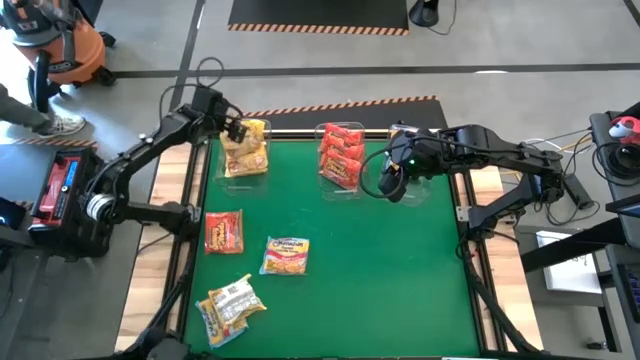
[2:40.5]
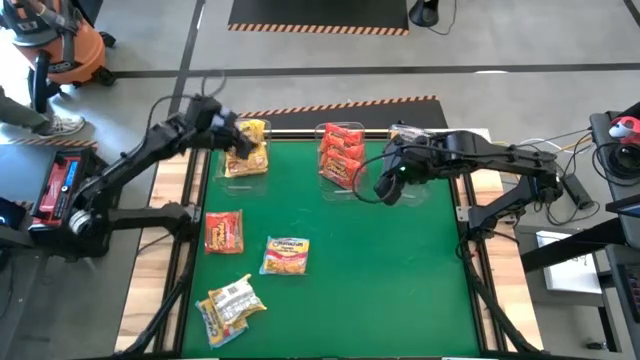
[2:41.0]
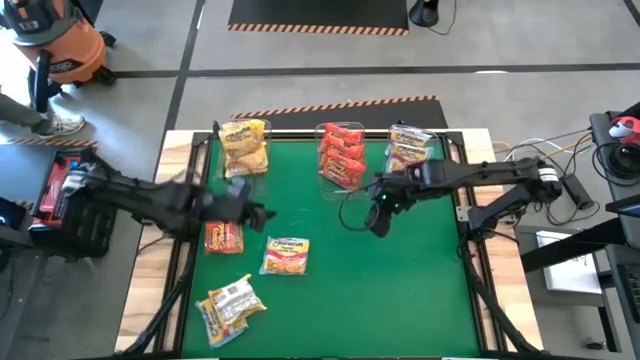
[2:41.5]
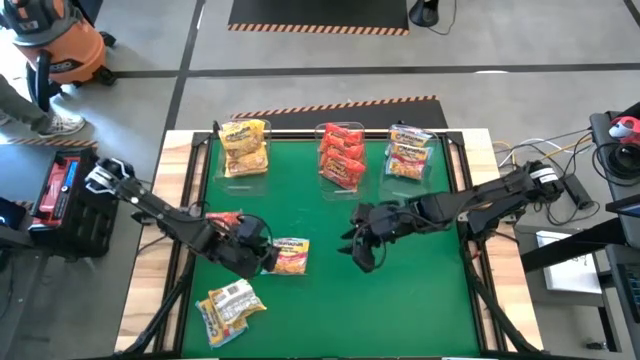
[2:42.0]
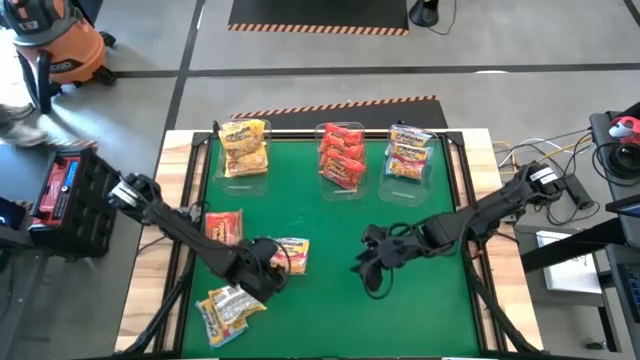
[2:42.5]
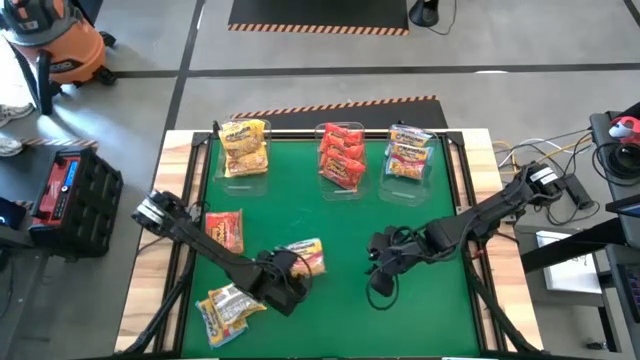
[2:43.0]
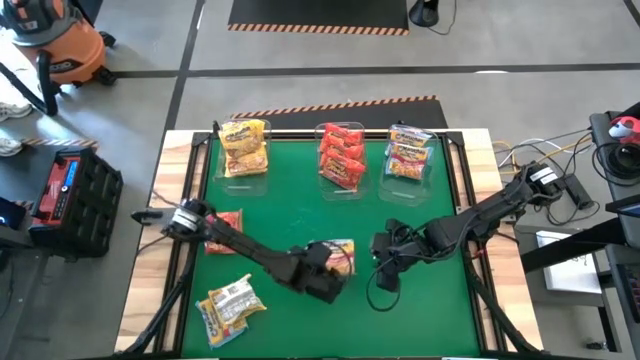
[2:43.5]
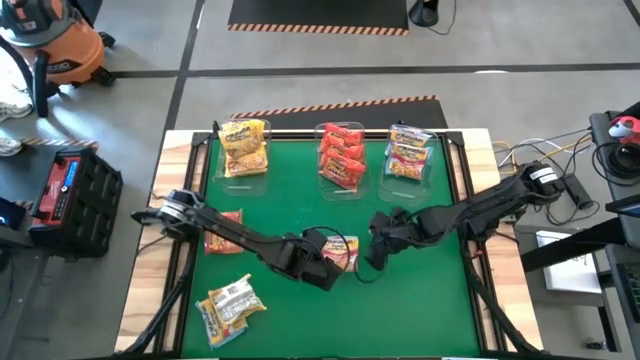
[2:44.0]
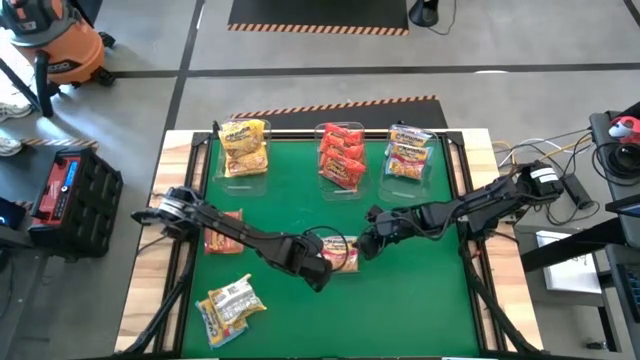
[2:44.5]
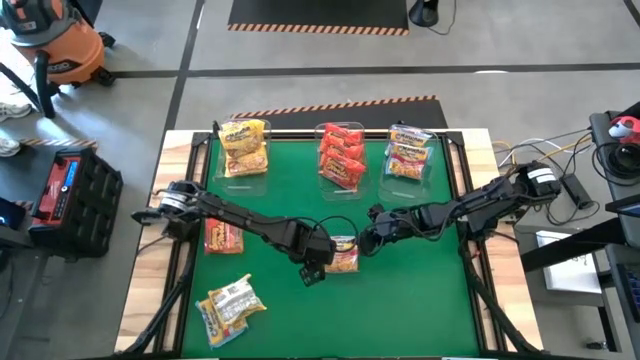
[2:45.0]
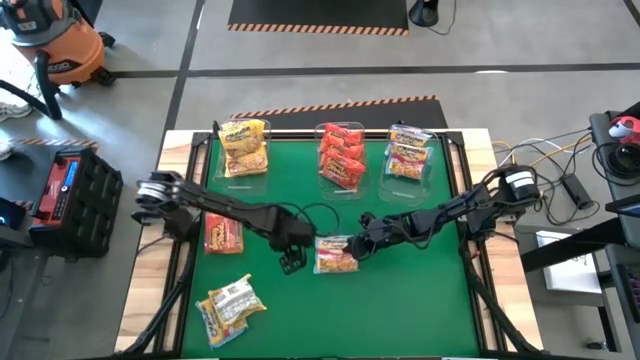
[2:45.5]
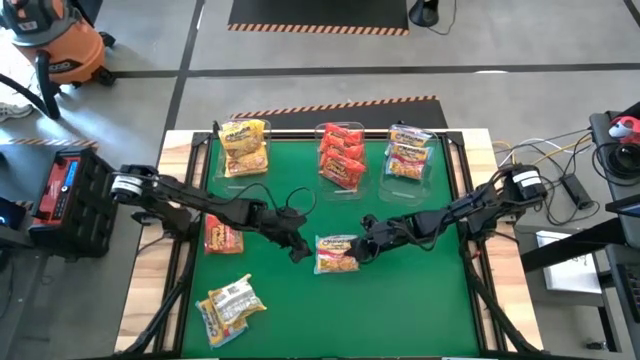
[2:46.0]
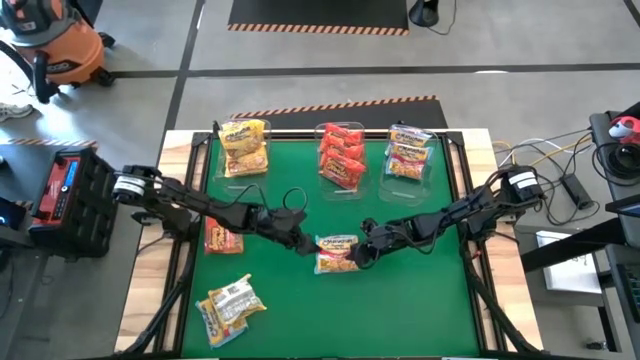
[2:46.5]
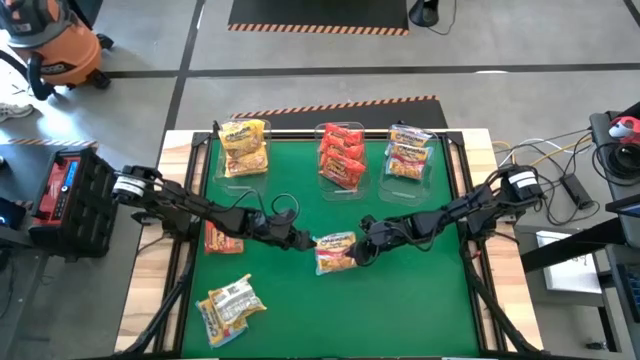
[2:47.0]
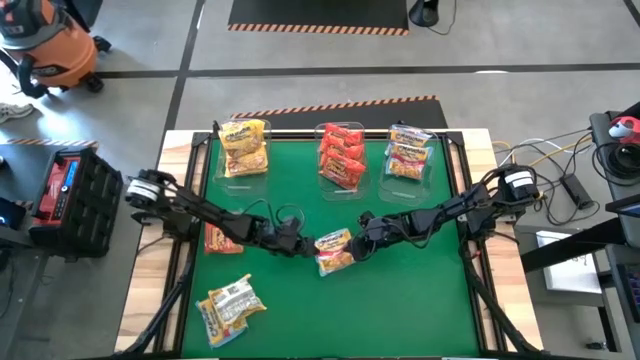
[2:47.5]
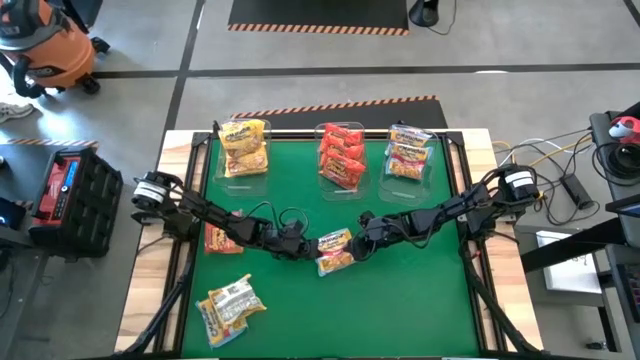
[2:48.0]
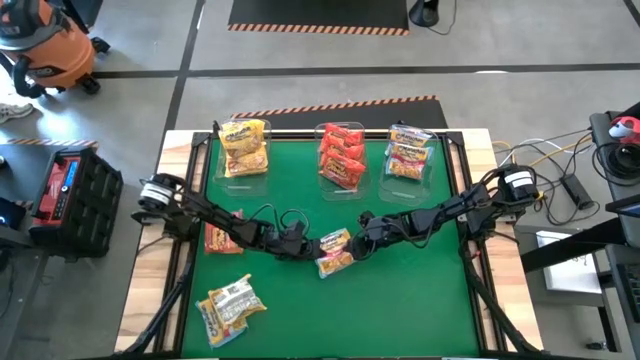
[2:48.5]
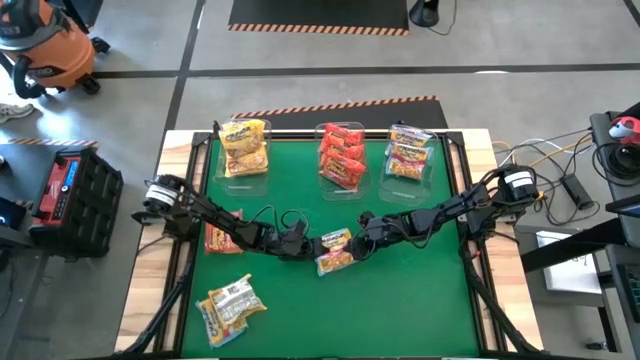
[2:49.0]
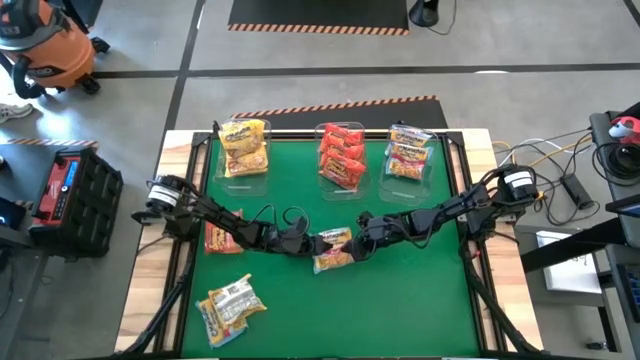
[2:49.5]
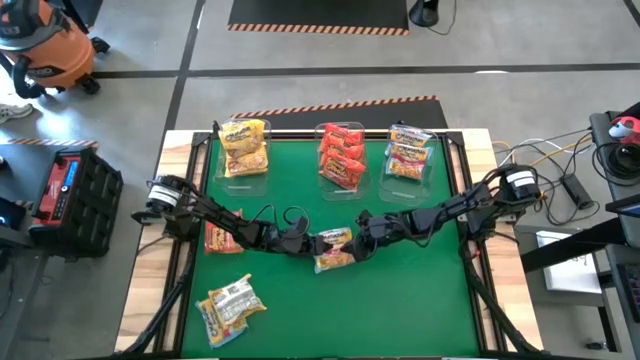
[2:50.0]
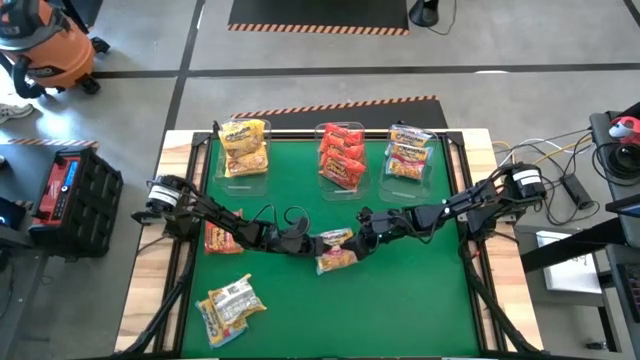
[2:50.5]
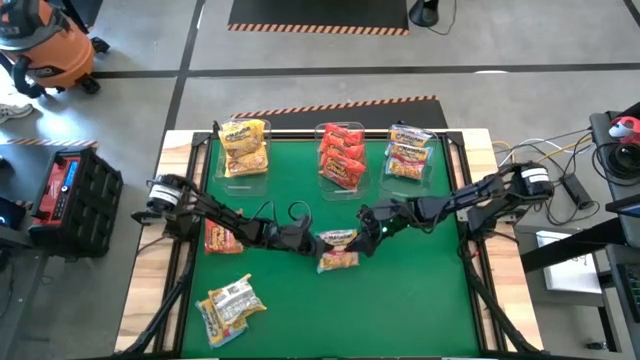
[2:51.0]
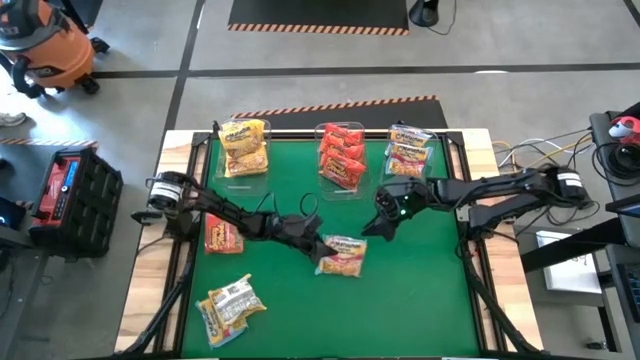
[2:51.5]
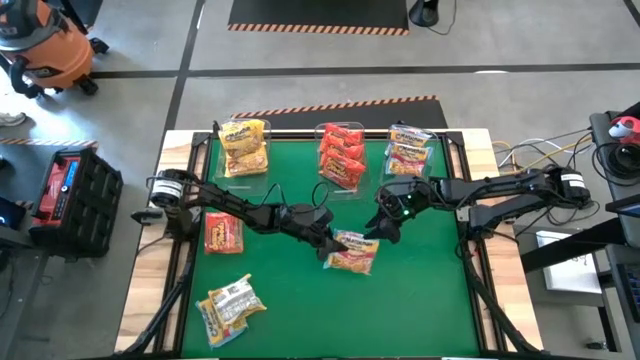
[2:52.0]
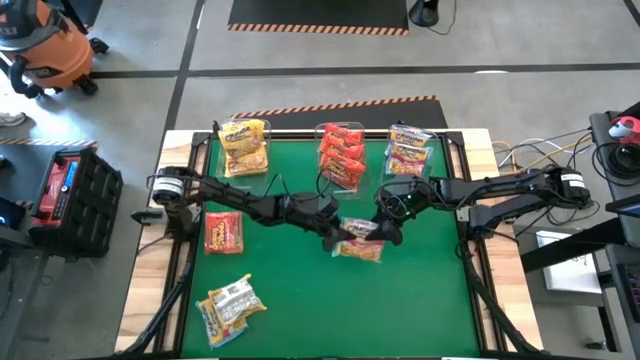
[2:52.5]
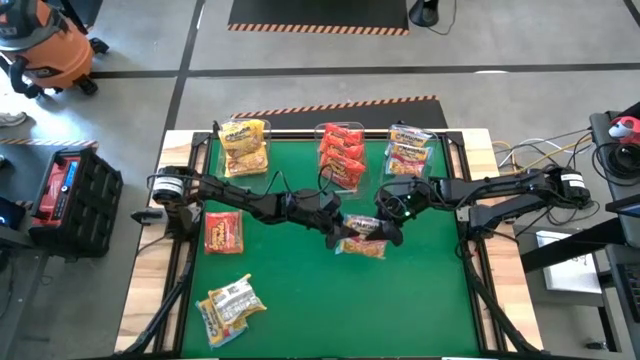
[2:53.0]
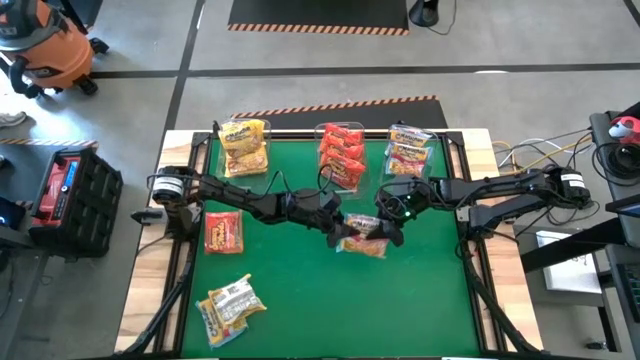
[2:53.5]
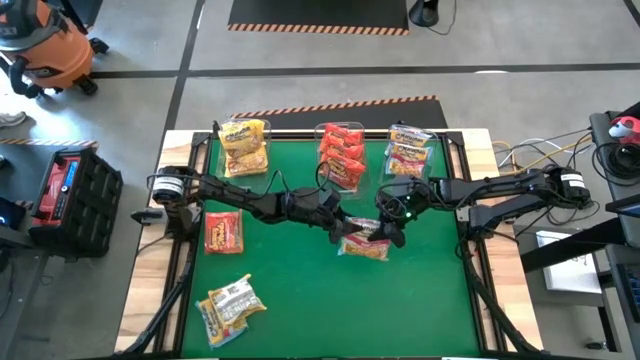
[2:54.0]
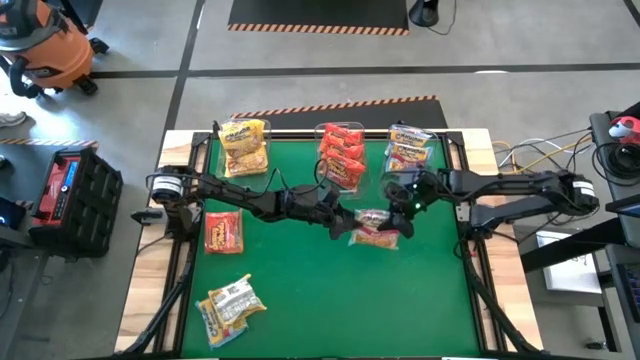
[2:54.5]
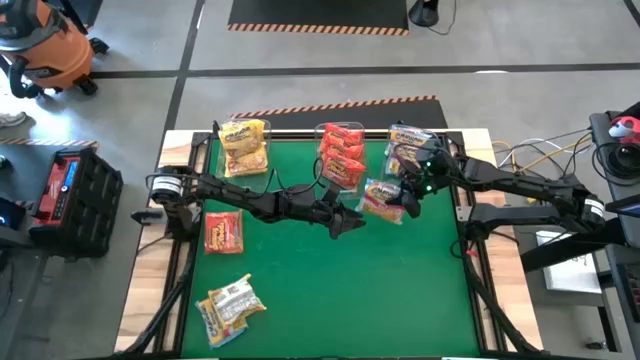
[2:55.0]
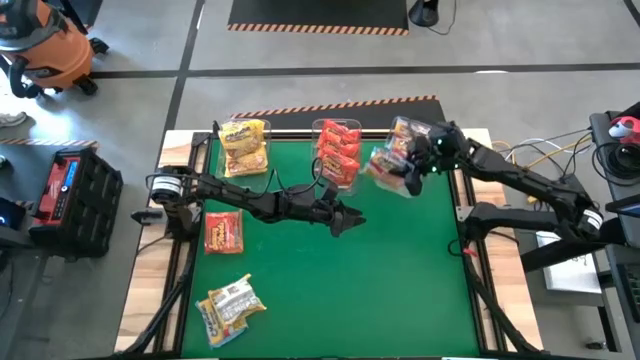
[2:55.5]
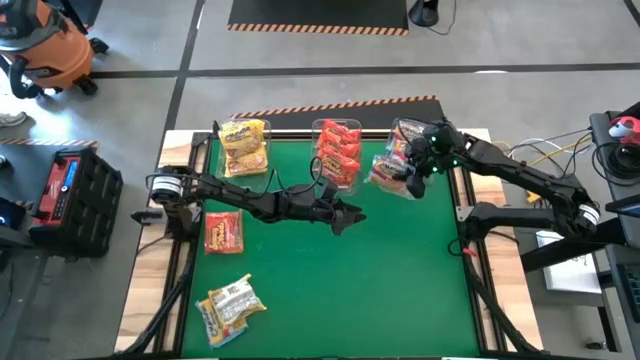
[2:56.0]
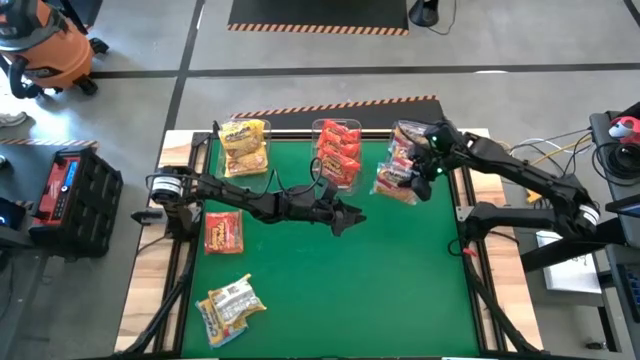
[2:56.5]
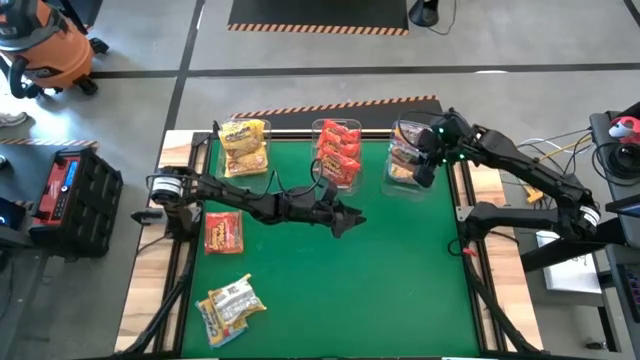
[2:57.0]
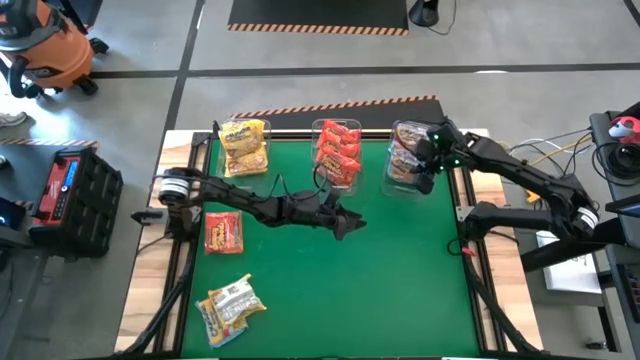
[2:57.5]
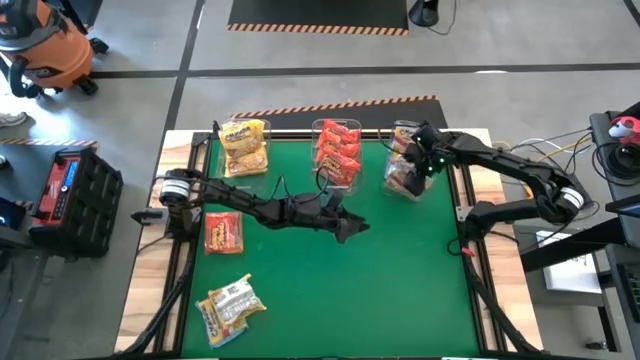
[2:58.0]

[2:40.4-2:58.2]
Task: Sort Maruchan noodles
Put the blue noodle pack into the right transparent bin

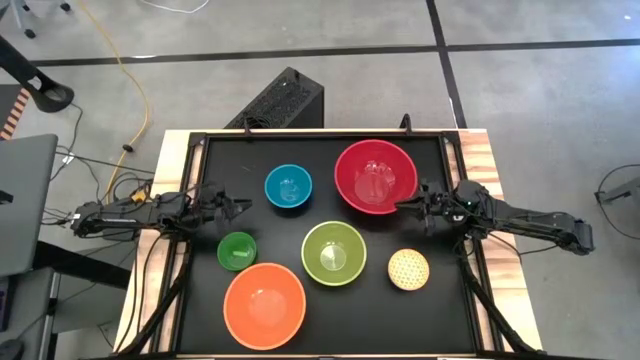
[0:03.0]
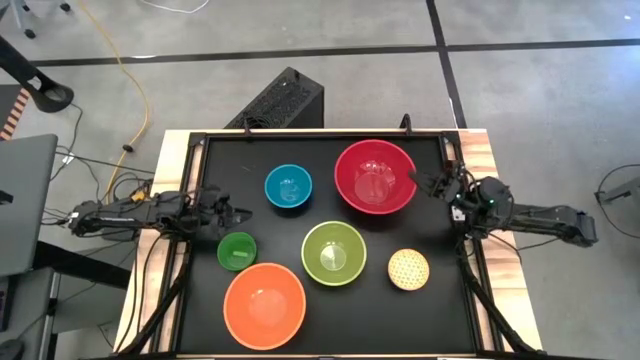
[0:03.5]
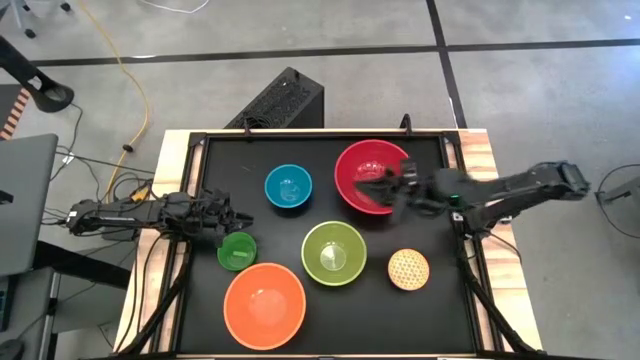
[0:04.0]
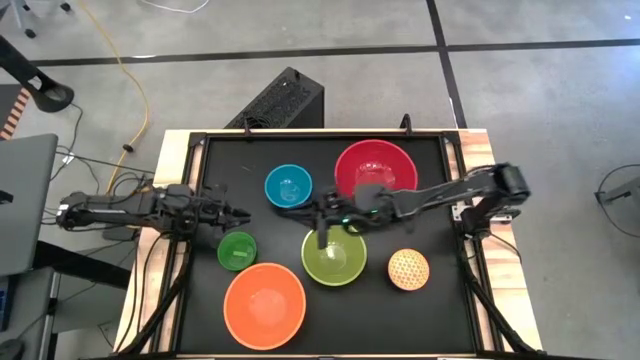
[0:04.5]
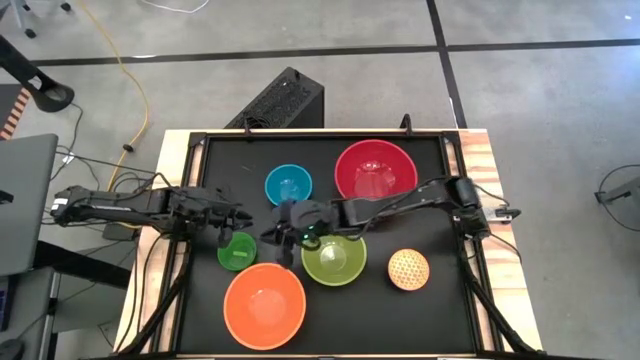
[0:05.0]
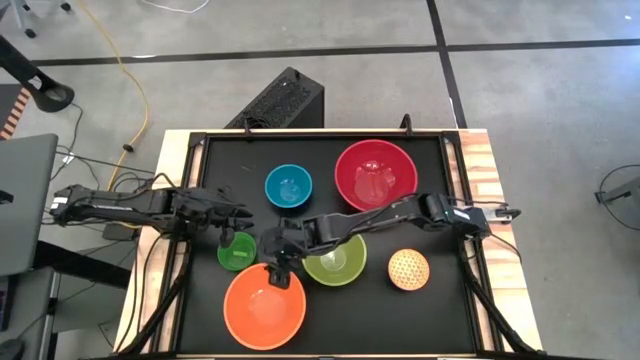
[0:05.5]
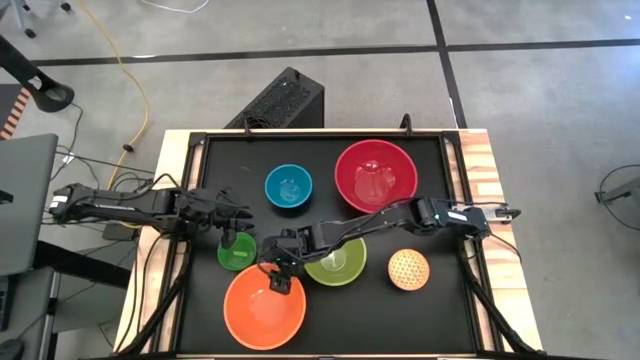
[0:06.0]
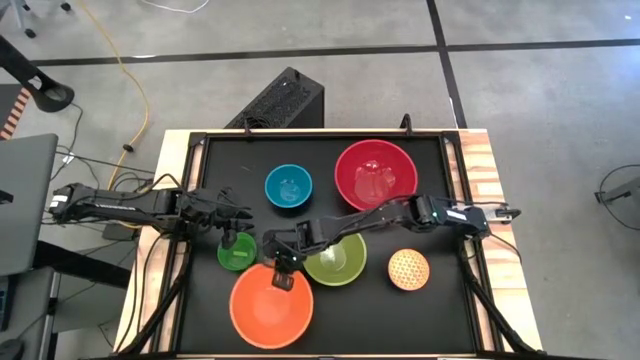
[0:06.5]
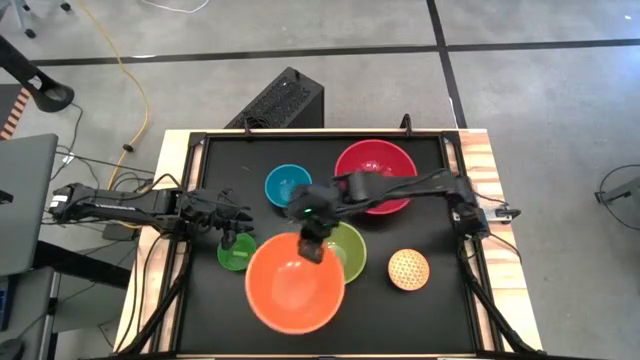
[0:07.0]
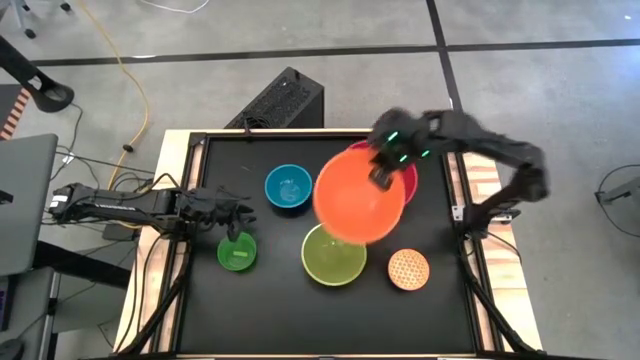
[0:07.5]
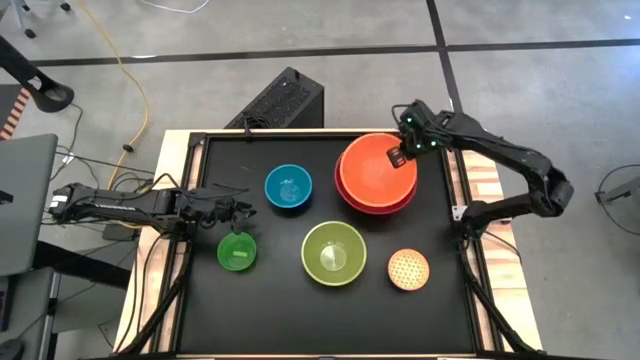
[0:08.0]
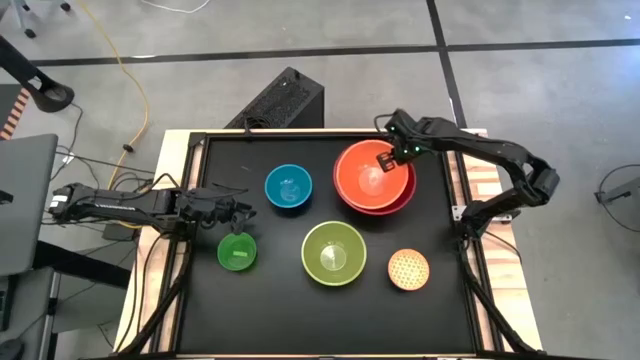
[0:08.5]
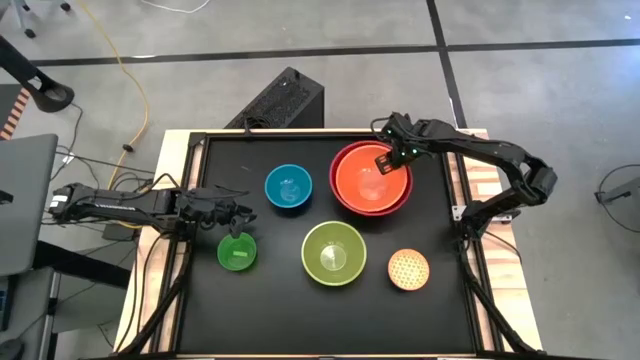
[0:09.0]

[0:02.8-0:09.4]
Task: Nest bowls inside each other by size order
Stack the orange bowl on top of the red bowl
